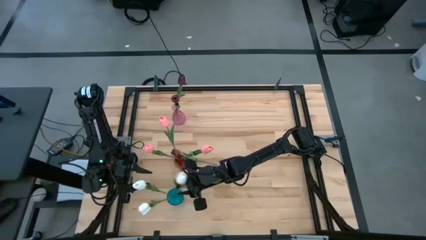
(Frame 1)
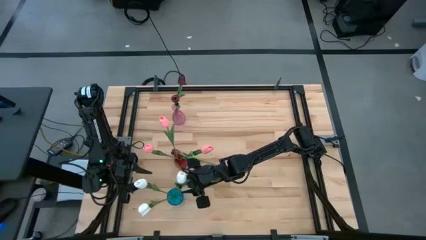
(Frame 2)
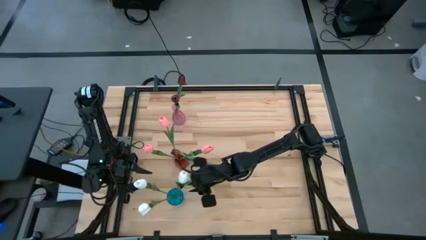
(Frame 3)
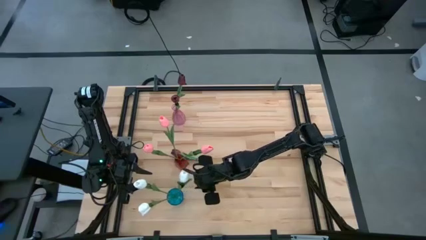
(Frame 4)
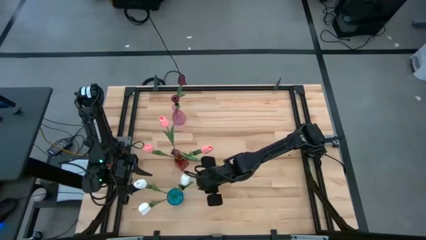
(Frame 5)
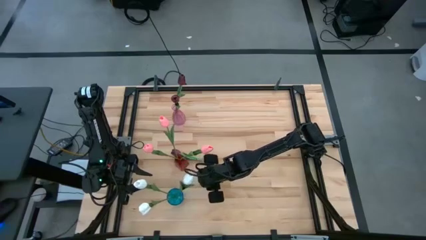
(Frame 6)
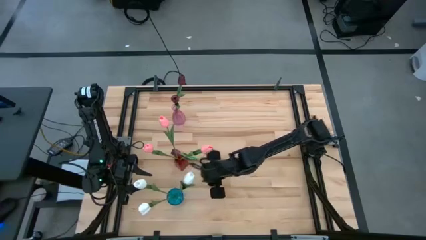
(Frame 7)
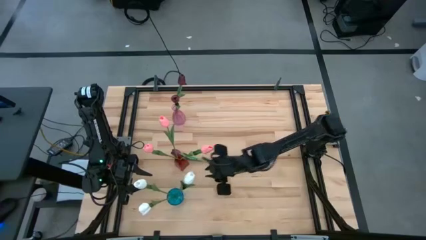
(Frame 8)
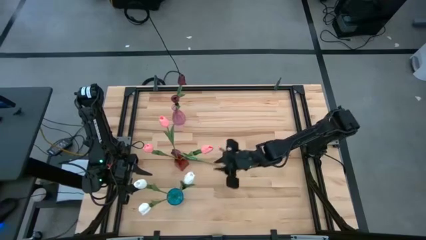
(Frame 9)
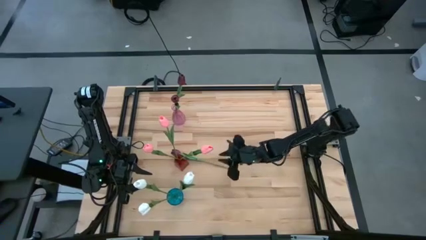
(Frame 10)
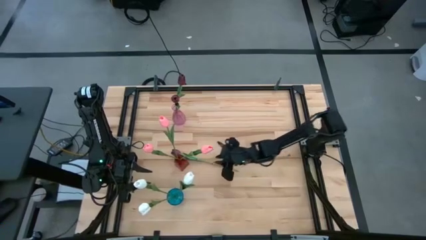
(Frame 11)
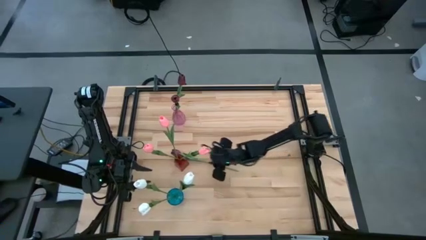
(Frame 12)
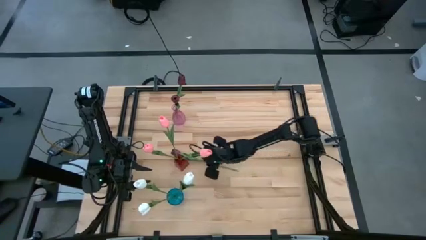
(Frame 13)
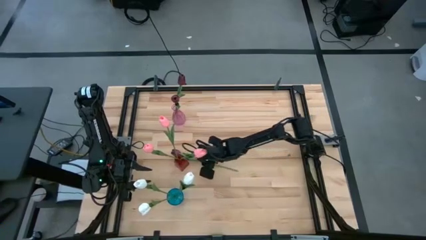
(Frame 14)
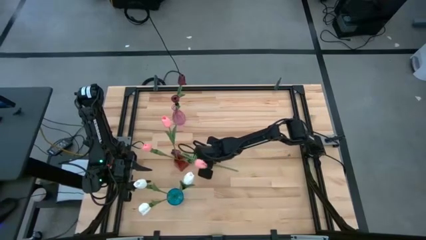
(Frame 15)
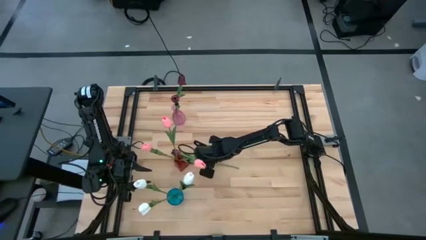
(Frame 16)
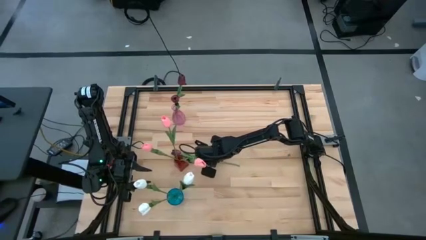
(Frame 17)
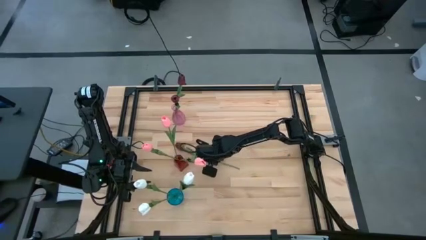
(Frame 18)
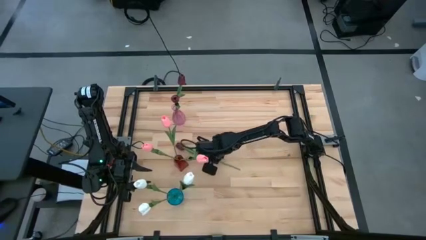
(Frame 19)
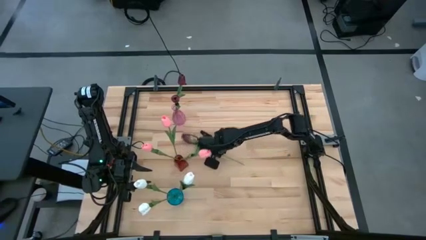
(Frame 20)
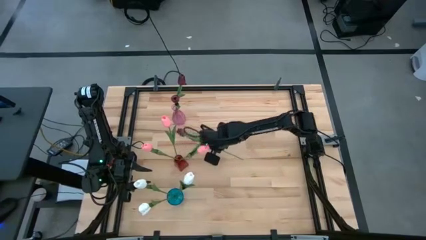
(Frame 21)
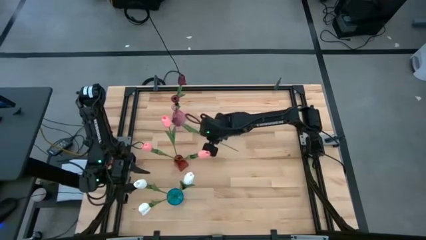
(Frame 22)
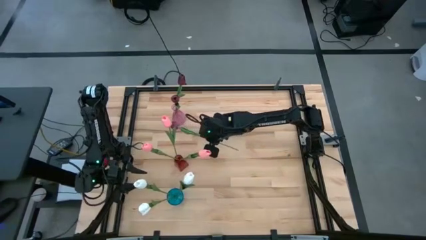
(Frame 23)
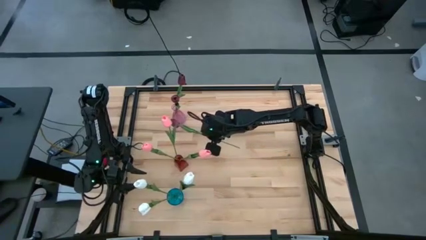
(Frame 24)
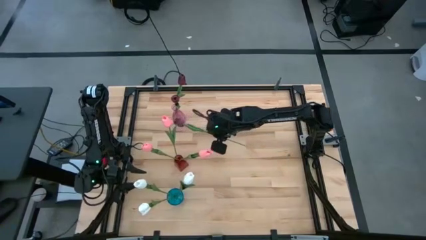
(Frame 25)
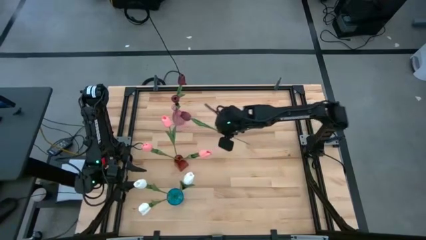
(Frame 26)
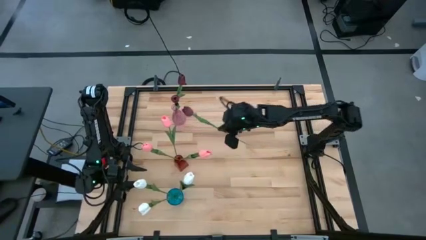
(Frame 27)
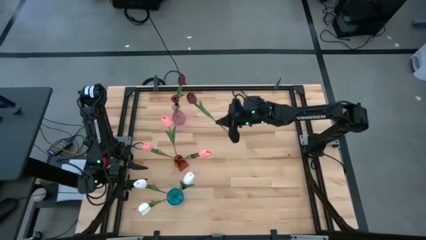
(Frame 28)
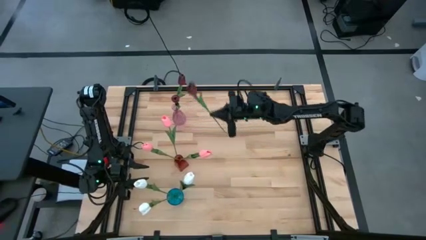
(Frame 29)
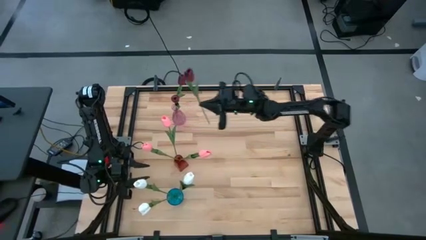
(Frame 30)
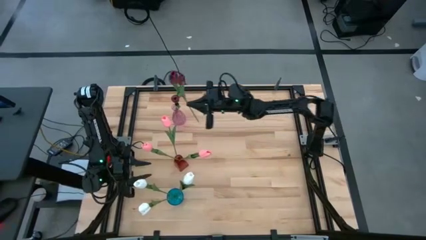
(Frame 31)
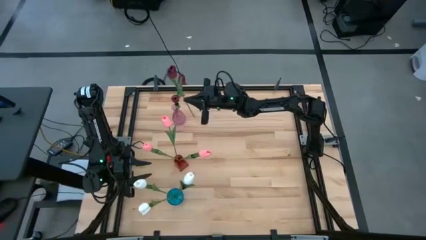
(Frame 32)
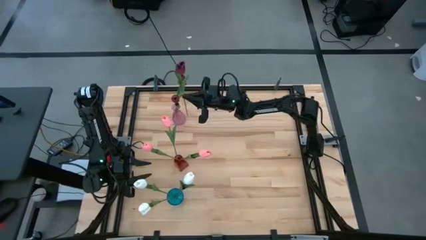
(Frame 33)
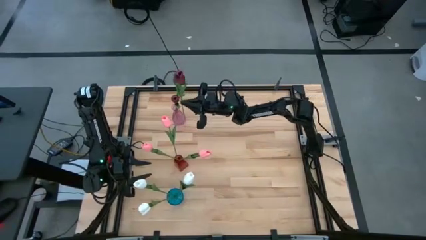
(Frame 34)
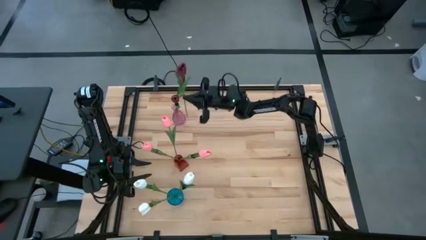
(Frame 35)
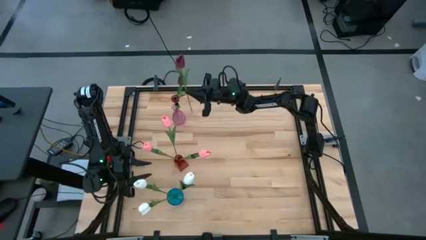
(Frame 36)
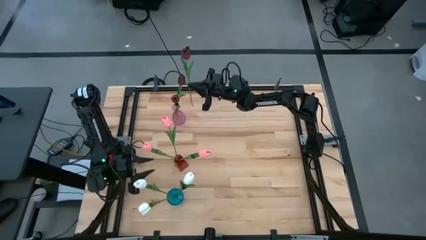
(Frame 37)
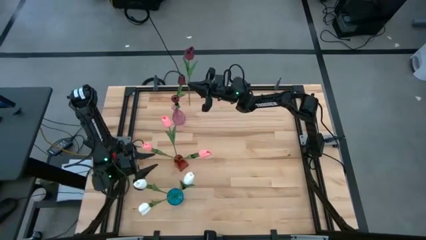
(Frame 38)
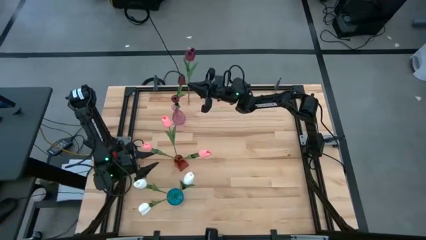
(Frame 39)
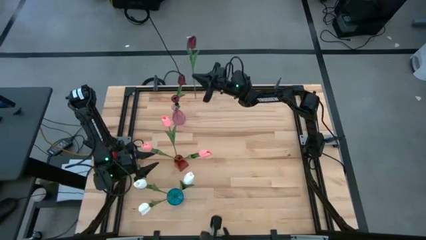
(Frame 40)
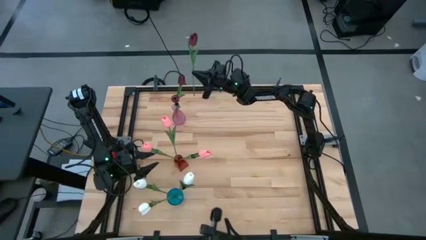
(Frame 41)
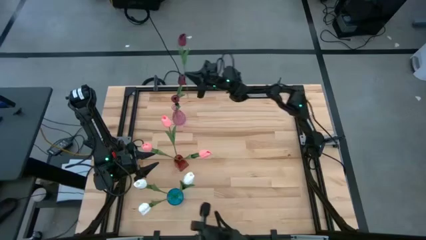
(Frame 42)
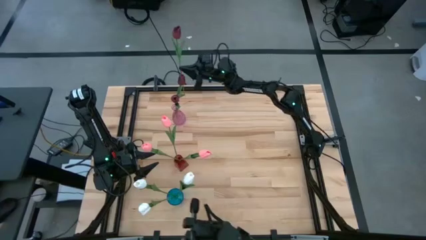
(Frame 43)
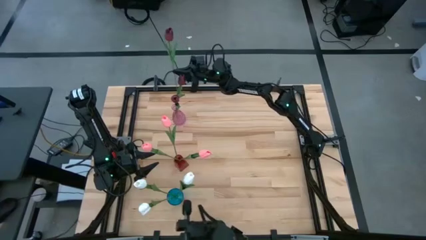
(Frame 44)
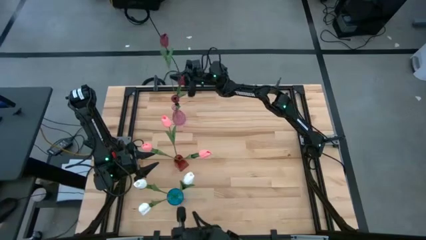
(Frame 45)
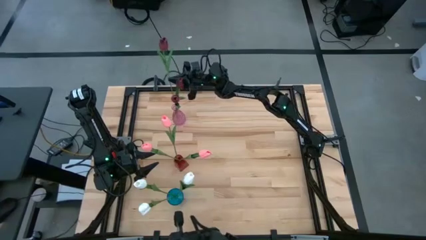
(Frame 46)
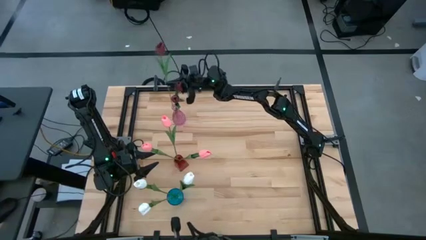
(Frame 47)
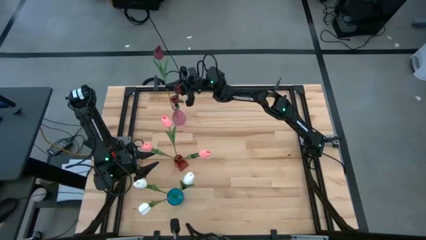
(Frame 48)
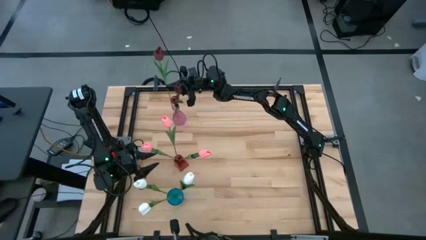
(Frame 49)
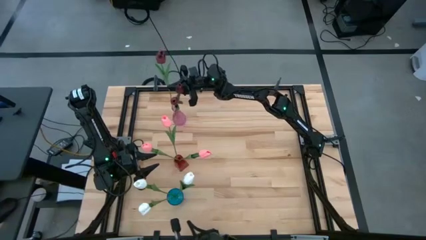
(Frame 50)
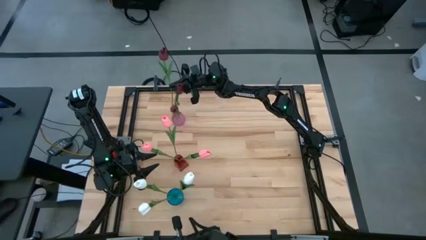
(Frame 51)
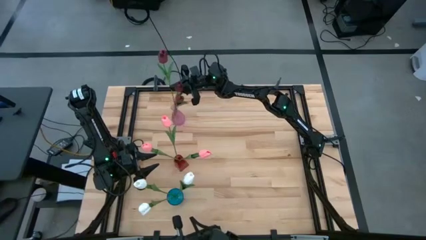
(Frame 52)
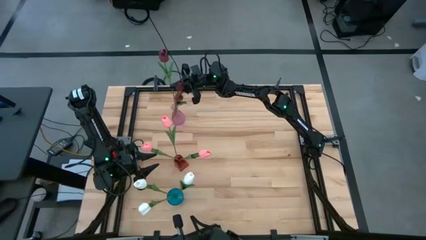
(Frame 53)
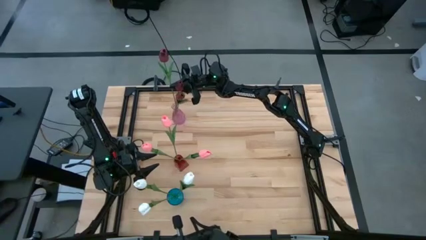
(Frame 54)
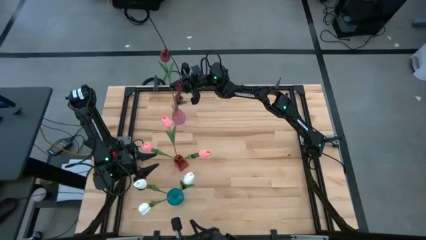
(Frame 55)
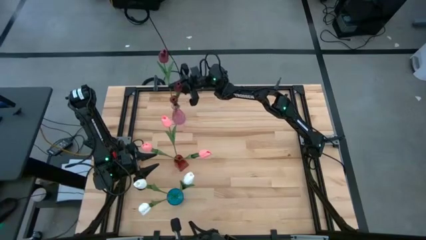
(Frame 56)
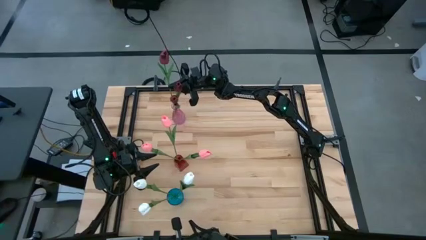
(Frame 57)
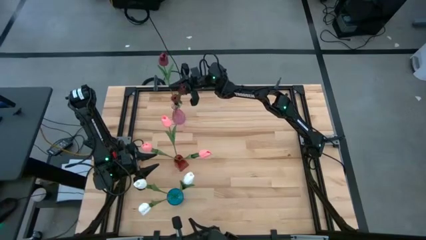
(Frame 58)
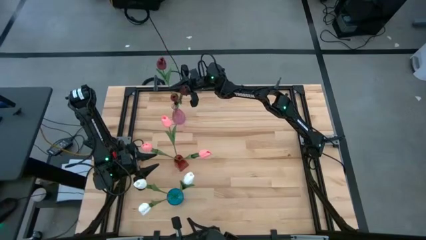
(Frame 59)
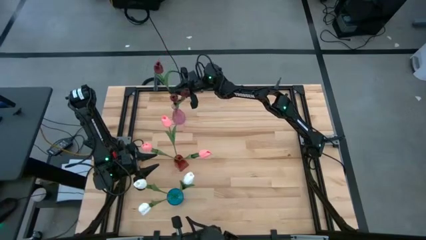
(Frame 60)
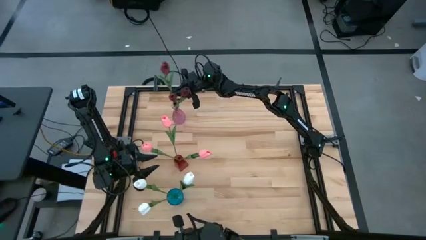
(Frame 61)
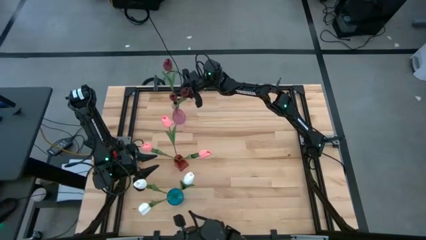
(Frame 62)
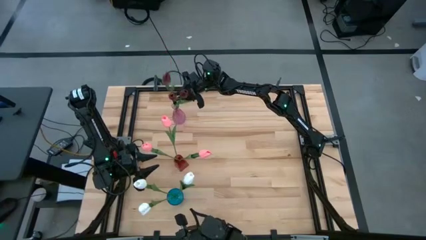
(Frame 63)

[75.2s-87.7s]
Task: Sort flowers into vase by color
Put the red flower into the pink vase

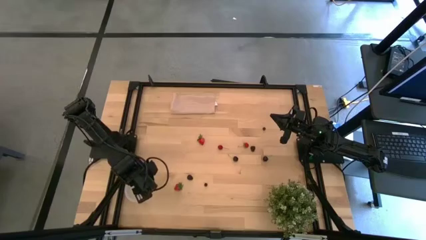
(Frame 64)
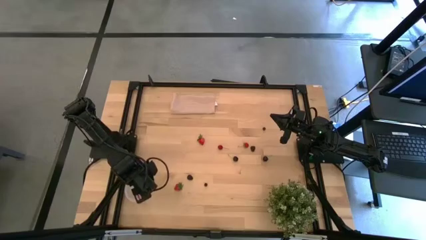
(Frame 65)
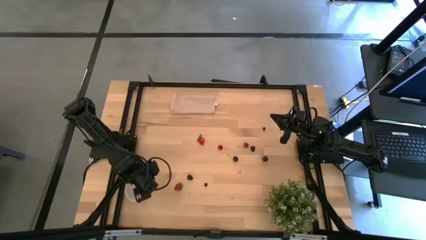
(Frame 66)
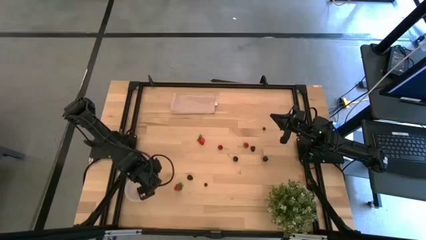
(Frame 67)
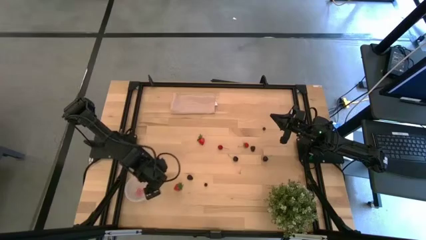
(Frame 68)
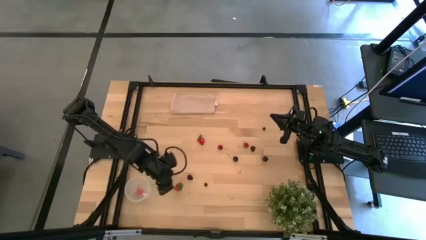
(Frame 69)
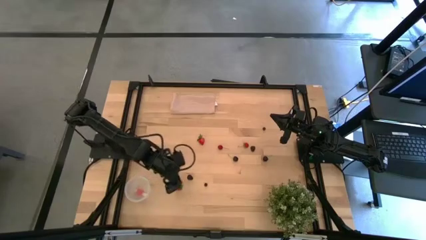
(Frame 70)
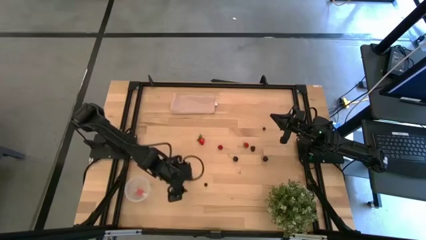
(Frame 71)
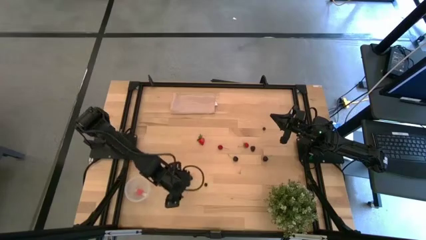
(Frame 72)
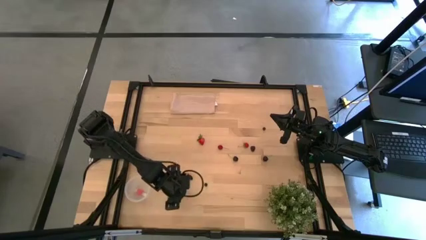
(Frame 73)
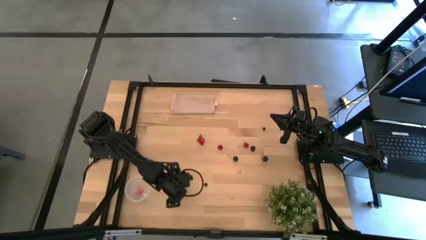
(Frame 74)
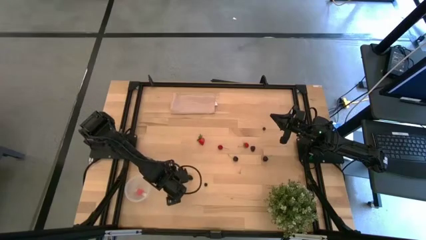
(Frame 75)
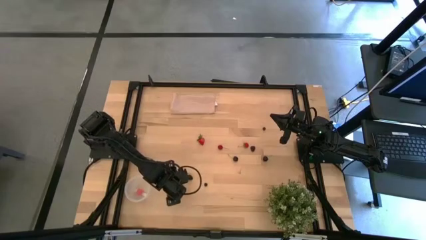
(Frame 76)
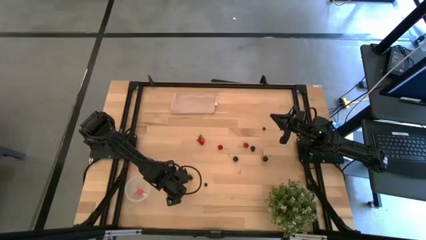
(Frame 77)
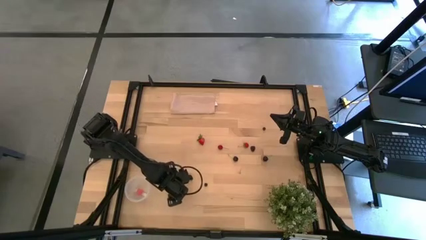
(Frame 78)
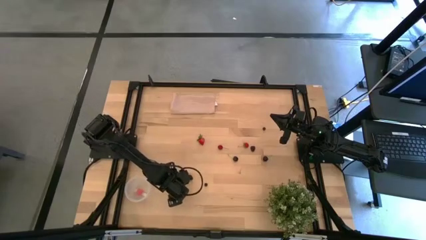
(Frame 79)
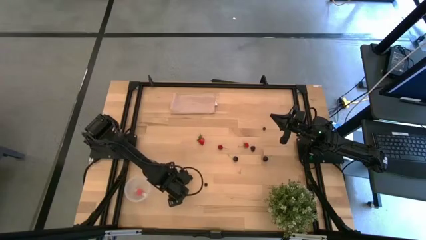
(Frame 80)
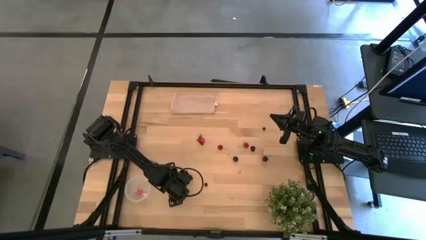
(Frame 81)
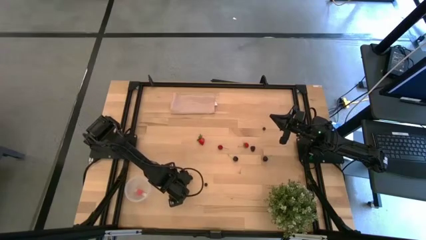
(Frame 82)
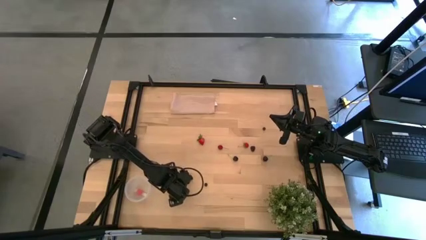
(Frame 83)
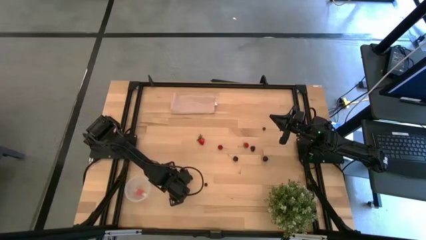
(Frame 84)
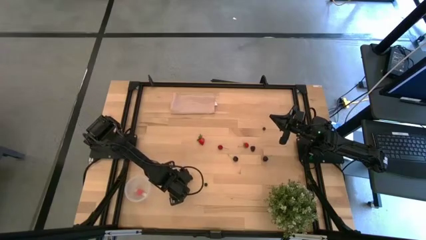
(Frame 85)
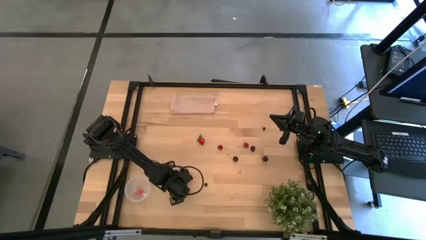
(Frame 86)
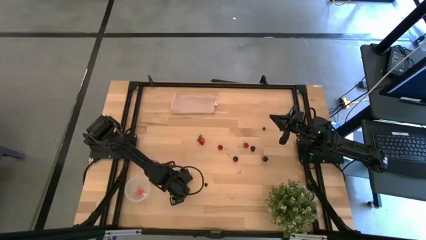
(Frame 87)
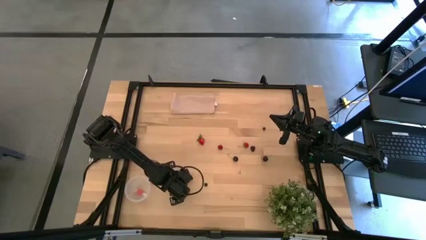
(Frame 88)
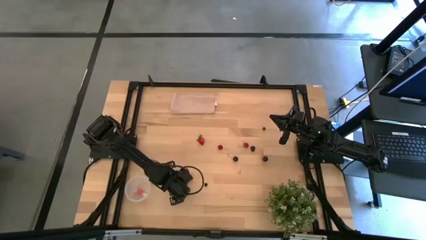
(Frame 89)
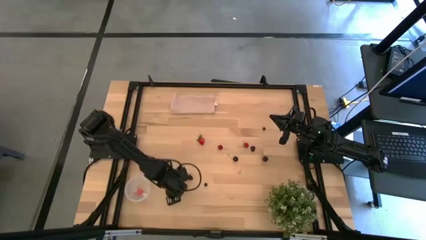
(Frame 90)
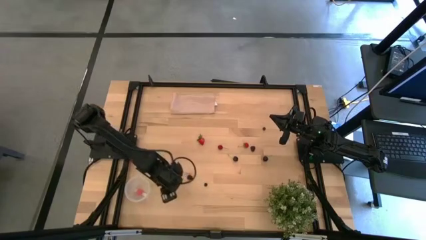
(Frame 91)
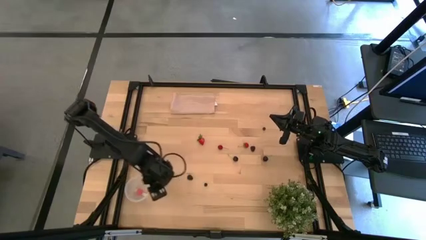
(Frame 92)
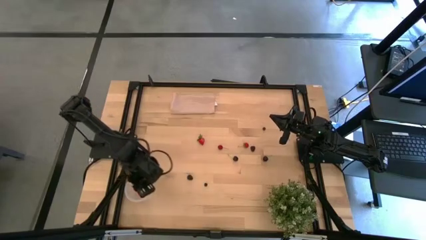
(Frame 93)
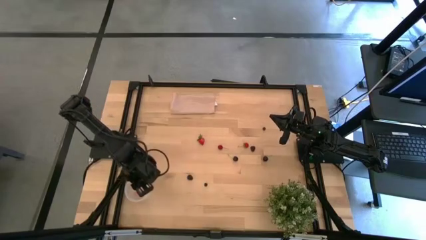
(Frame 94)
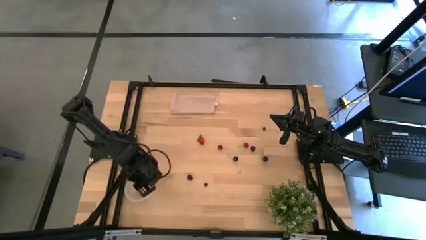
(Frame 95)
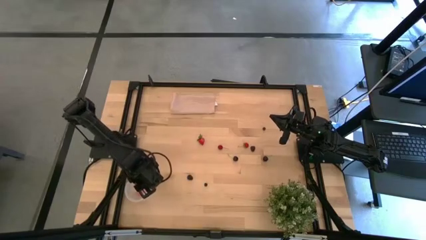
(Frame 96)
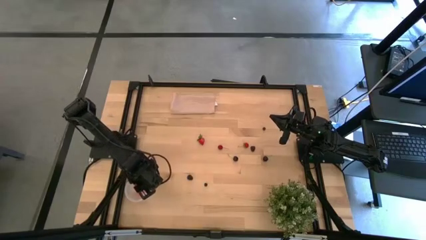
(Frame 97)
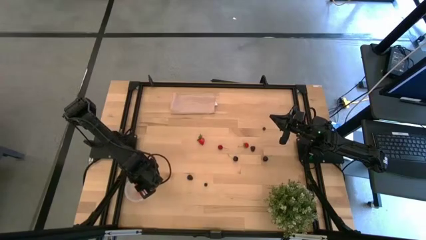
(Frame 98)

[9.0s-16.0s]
Task: Pick and placing Produce into tupperware
Put the bottom strawberry into the transparent bin
